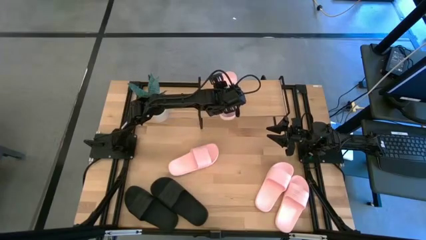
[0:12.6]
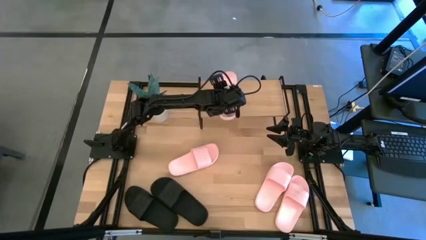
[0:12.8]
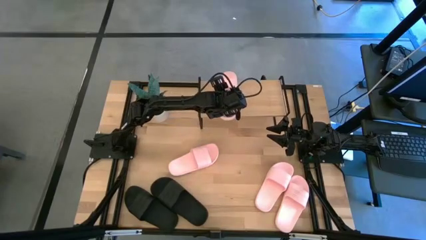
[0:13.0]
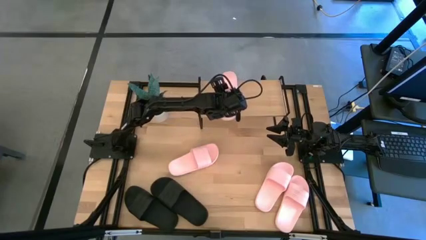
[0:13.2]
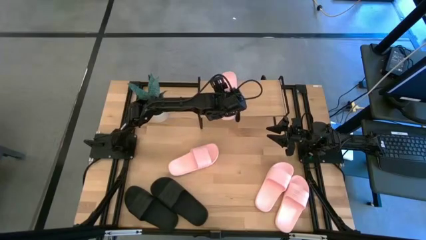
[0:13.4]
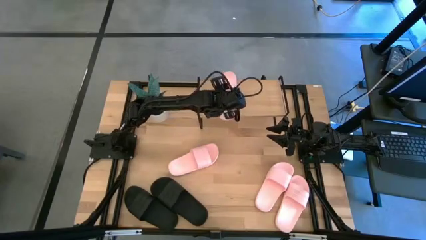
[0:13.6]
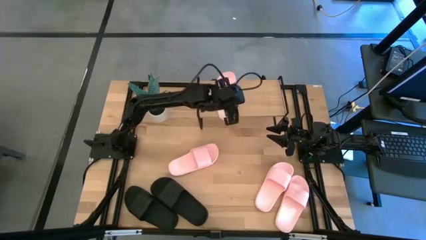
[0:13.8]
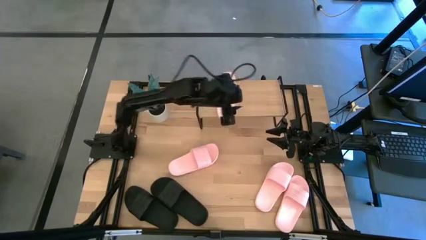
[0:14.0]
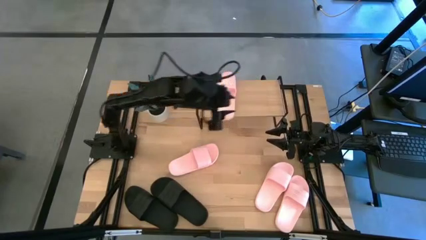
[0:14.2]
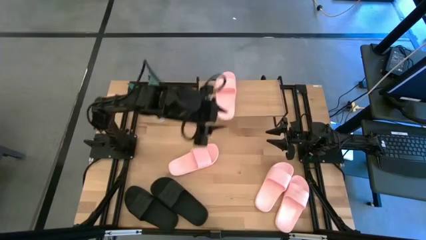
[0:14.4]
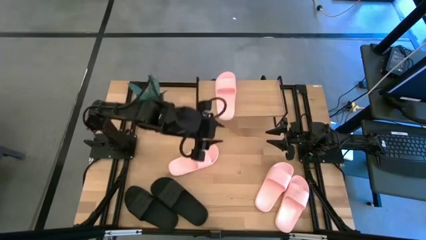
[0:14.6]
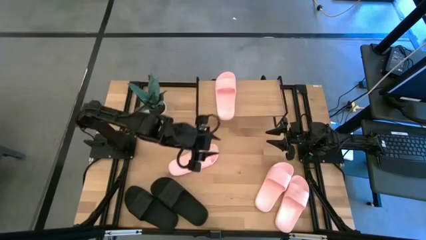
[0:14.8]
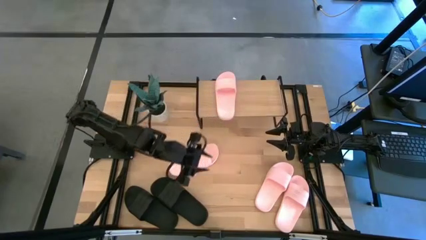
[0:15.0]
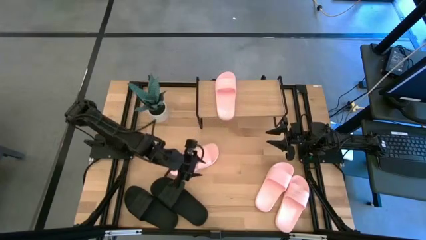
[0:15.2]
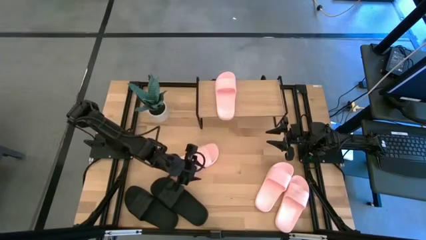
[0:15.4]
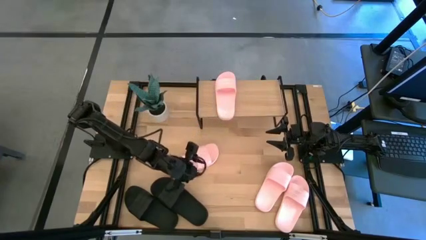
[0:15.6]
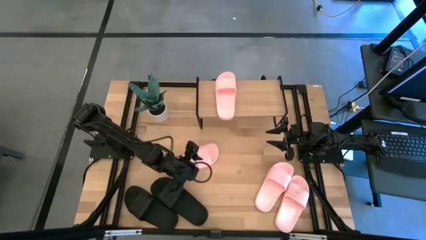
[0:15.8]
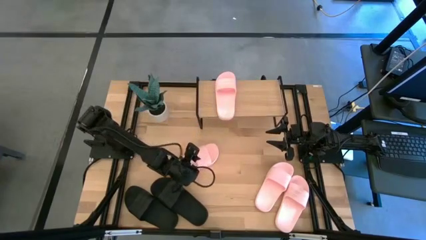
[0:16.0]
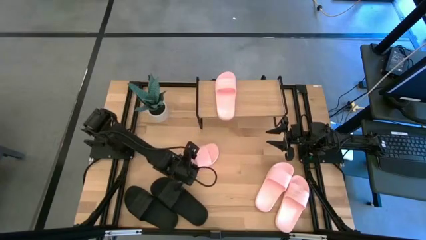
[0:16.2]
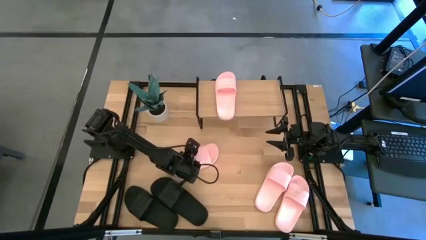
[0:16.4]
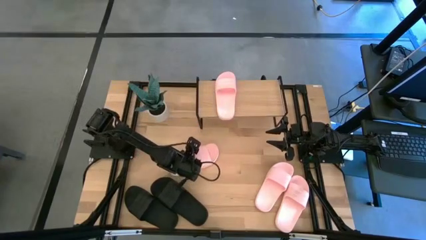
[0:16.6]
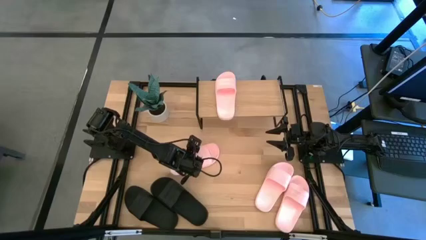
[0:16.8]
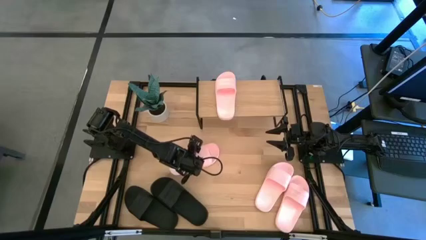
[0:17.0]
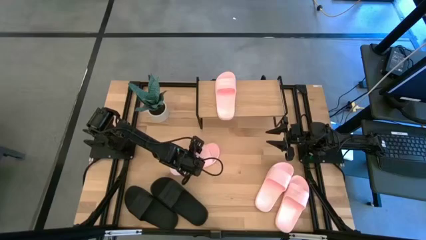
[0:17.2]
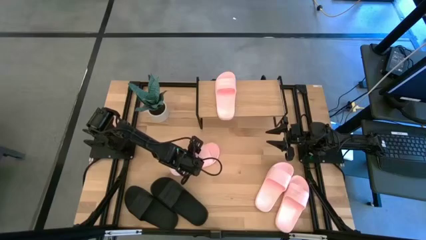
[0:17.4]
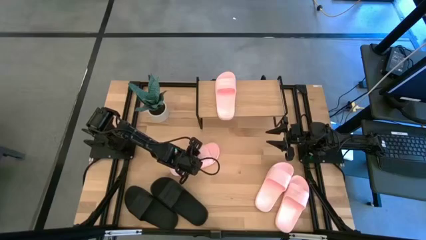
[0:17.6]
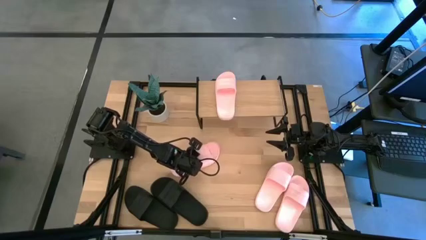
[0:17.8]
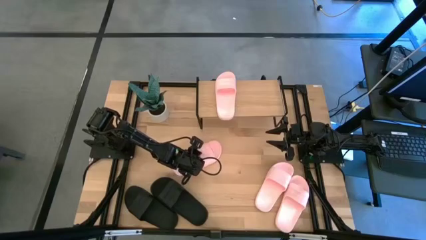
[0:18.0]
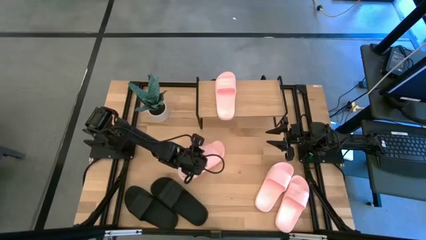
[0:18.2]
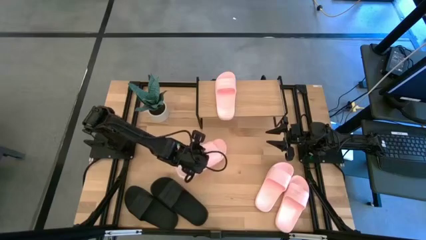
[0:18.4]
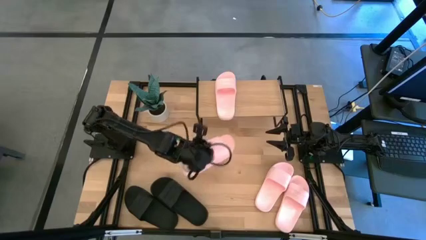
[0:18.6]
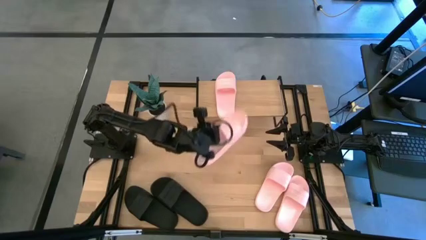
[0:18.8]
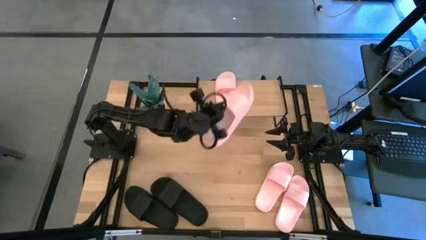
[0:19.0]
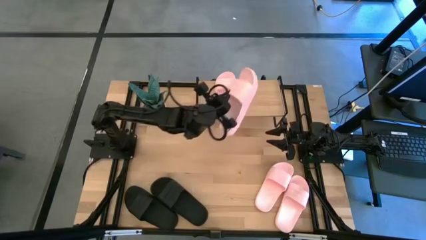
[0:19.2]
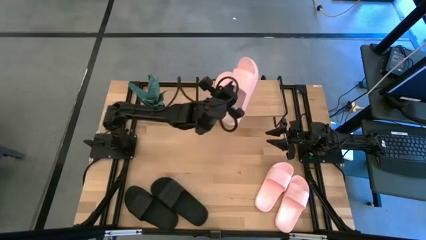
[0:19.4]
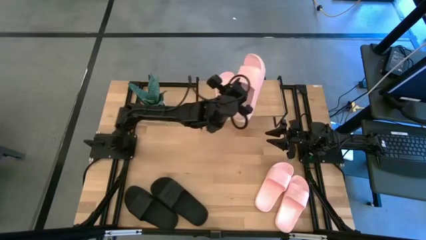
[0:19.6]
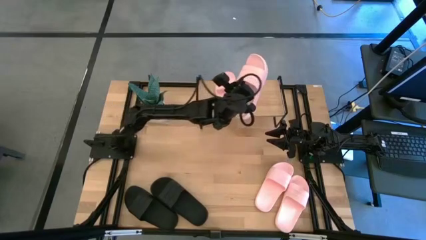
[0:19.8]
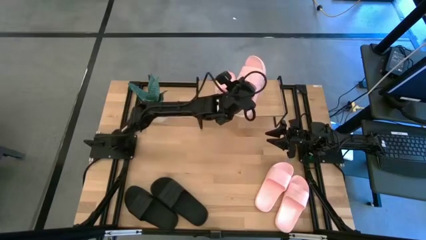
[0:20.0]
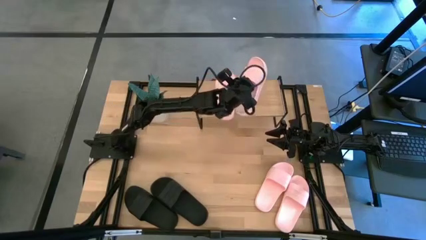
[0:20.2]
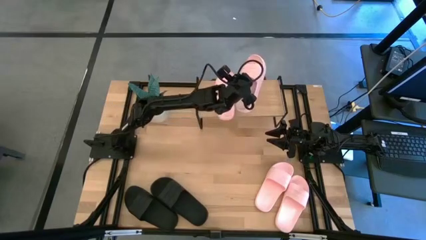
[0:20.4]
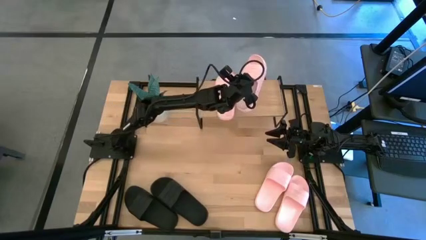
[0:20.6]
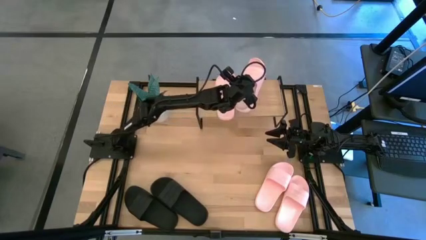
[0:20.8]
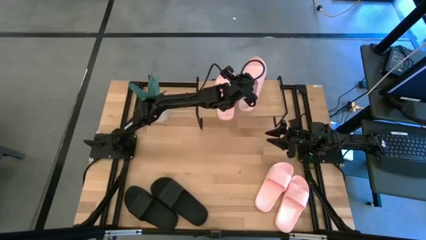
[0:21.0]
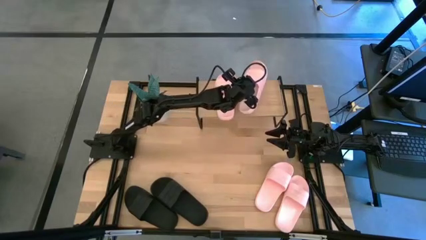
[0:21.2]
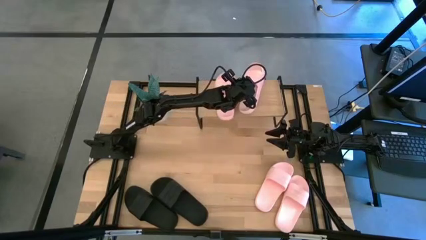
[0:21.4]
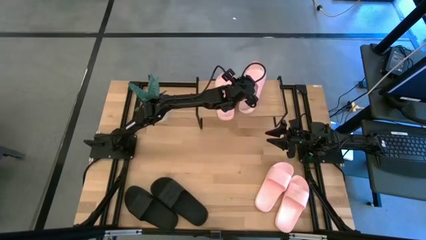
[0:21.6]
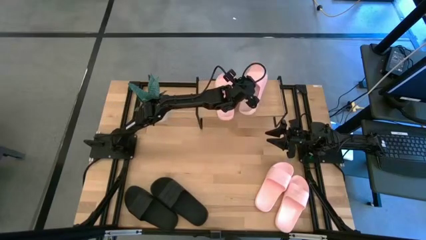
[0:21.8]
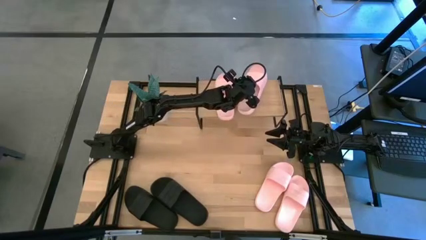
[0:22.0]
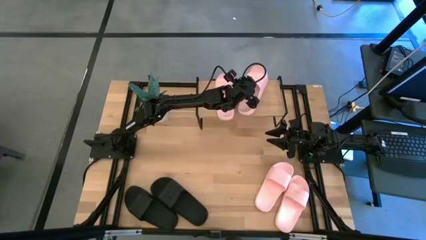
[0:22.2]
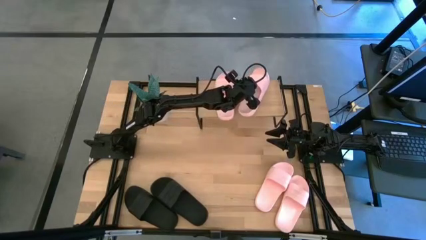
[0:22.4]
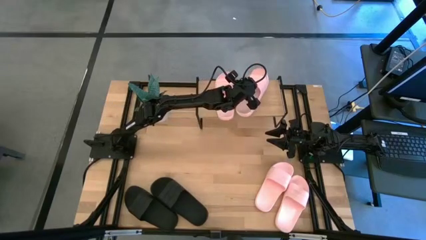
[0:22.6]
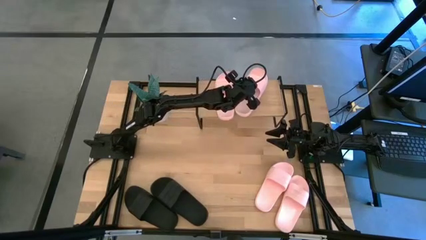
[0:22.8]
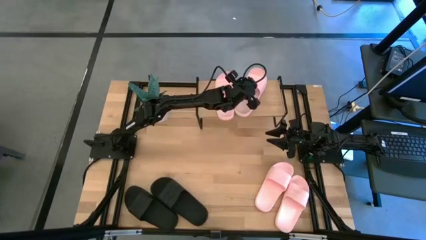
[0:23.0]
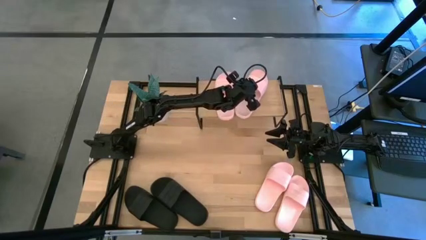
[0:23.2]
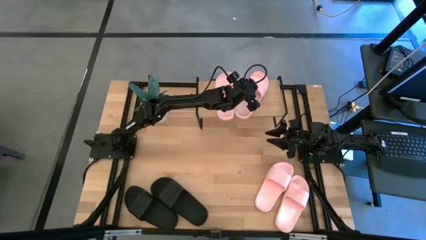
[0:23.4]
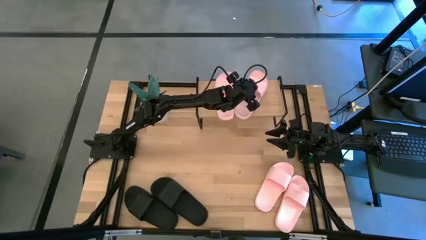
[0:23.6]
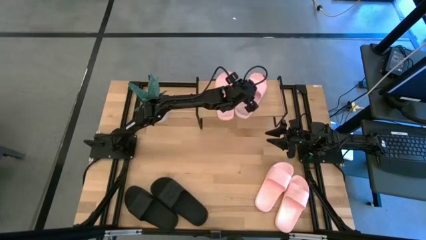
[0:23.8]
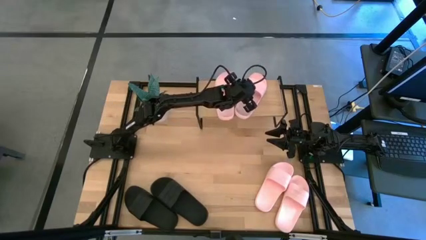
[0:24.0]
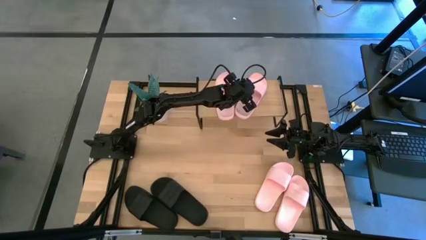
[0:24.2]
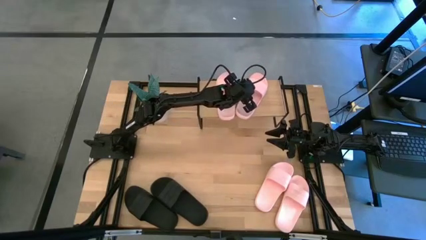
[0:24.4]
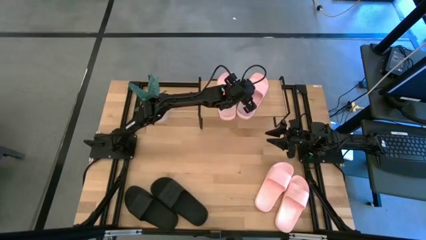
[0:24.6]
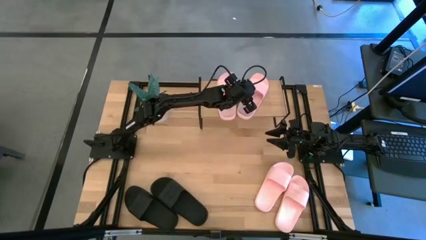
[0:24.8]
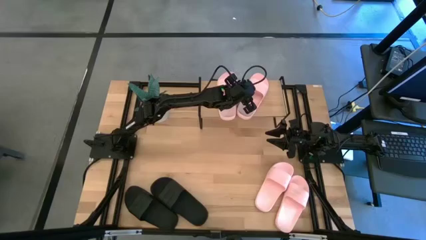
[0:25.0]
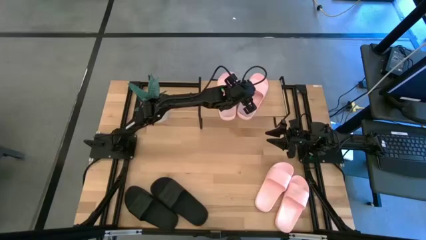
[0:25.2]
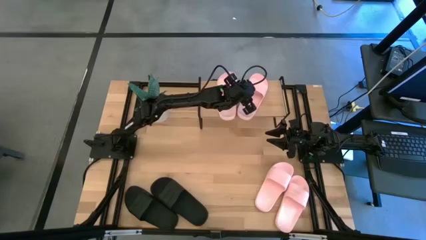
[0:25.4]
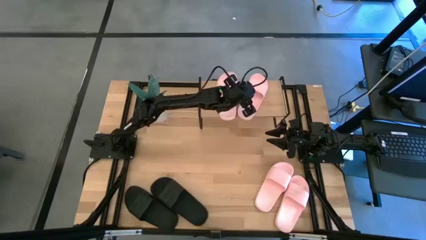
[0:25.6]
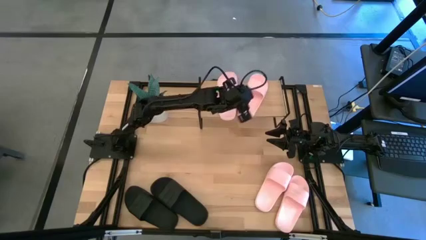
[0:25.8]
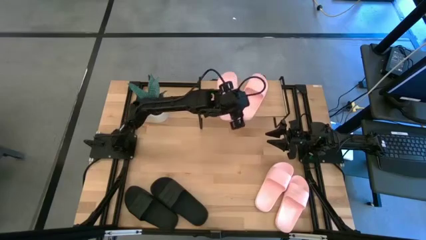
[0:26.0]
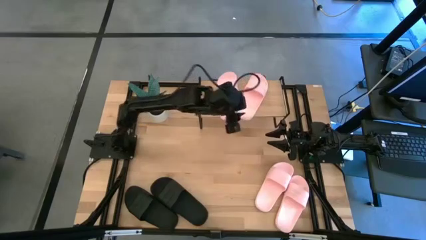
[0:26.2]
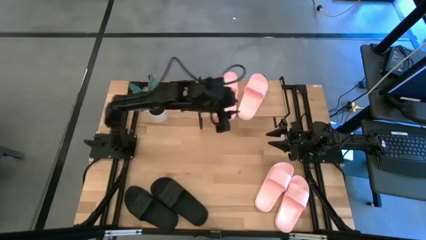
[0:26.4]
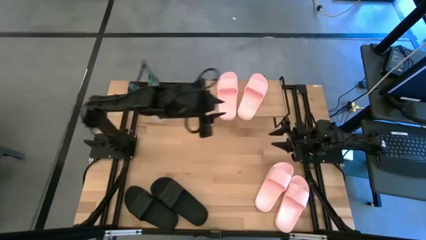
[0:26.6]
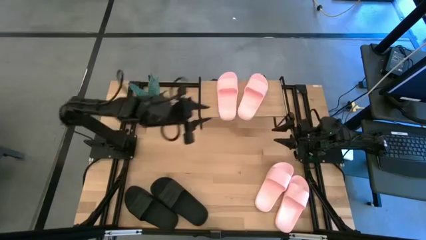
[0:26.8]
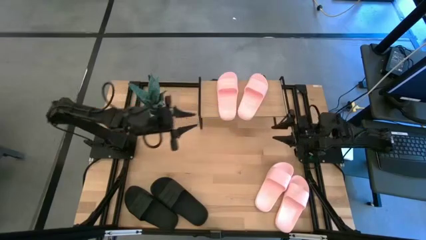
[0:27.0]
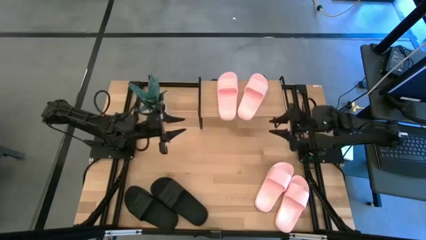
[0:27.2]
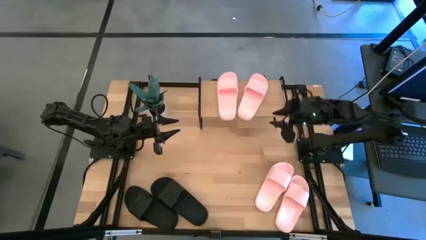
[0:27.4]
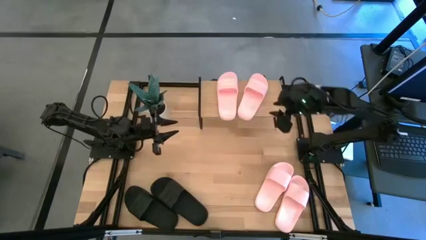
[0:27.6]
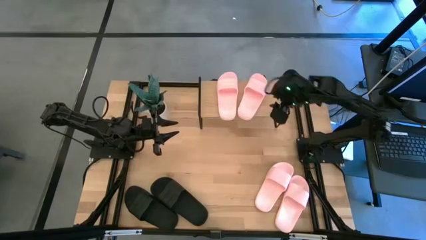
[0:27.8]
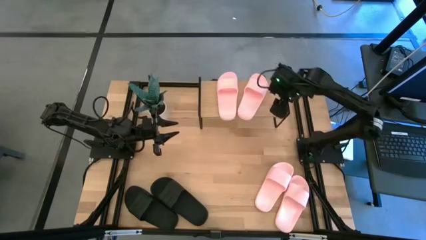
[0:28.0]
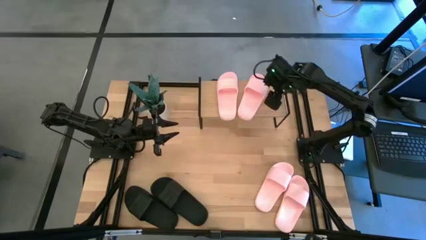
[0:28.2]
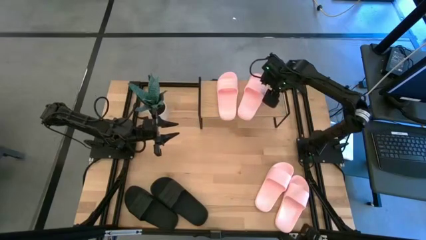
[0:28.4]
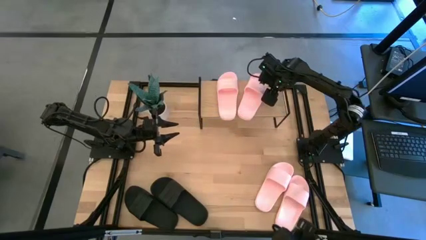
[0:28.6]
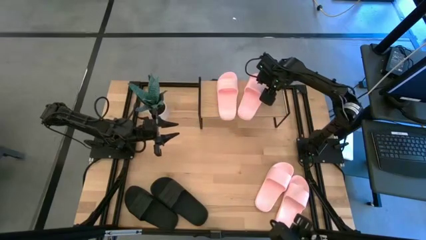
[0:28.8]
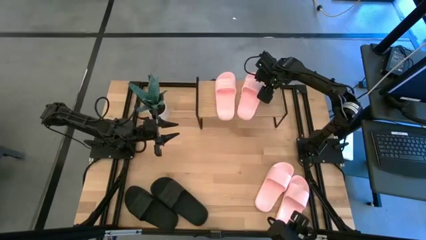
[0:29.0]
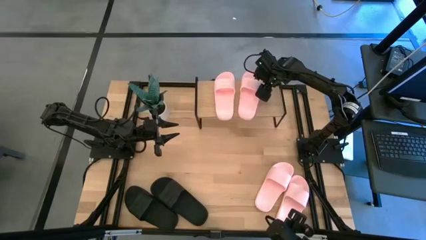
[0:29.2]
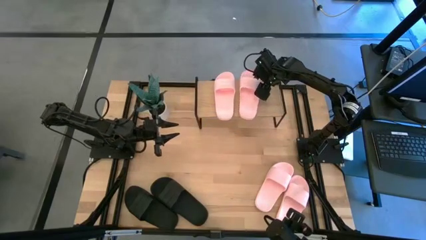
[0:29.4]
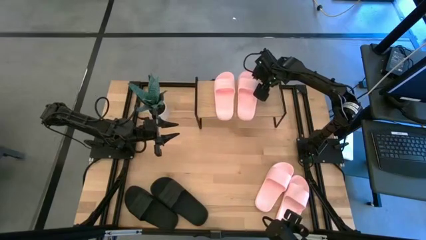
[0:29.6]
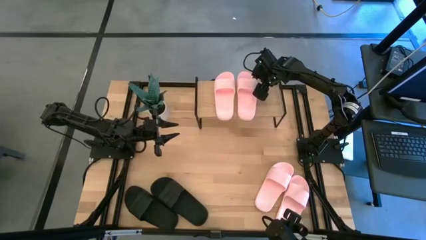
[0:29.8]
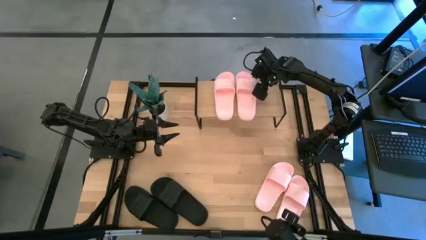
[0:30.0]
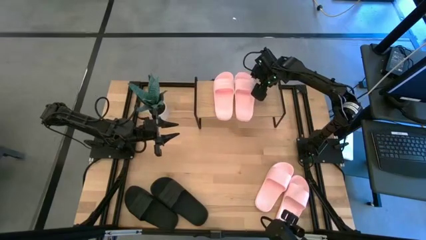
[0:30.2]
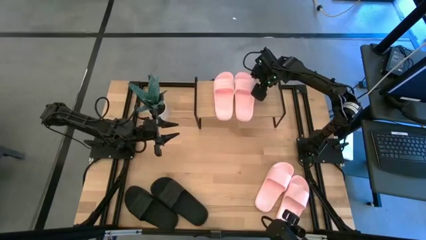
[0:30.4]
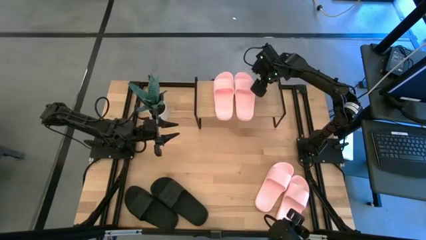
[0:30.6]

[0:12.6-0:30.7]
Task: Pick and place slides into the shelf
Put the pink slipper on the shelf
